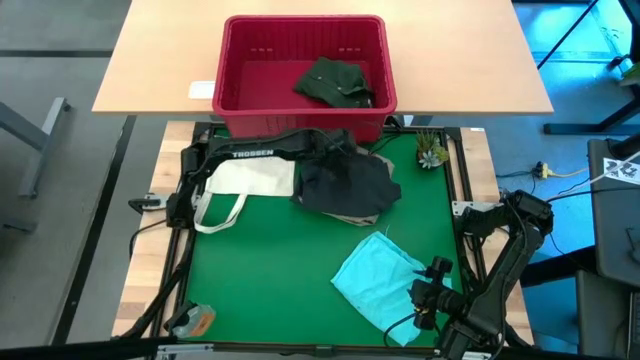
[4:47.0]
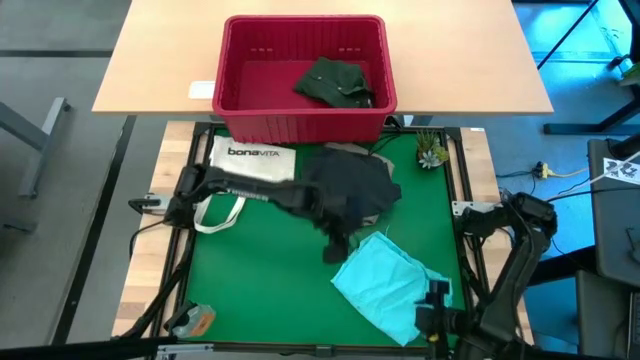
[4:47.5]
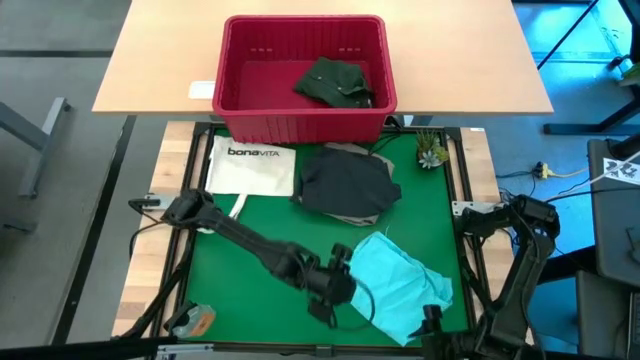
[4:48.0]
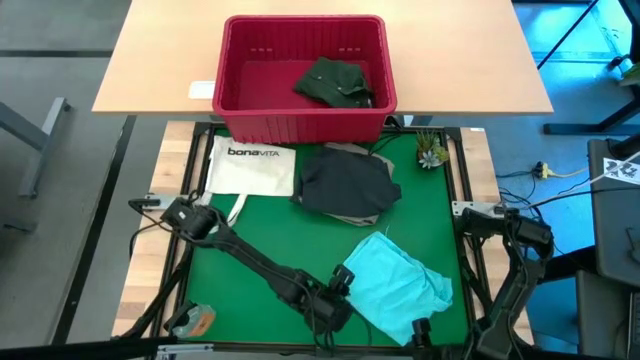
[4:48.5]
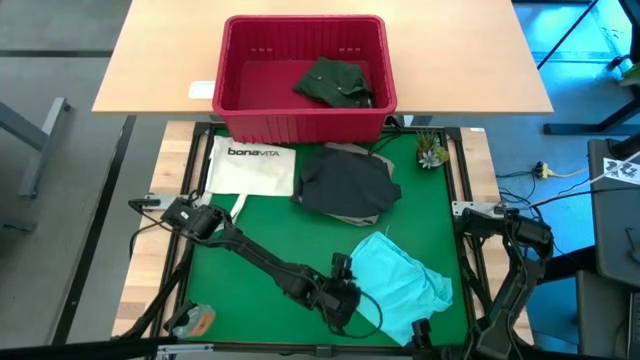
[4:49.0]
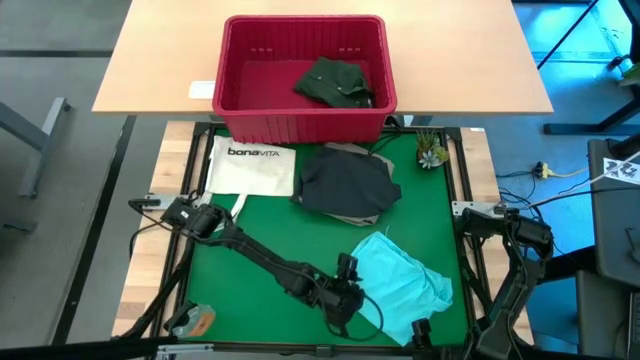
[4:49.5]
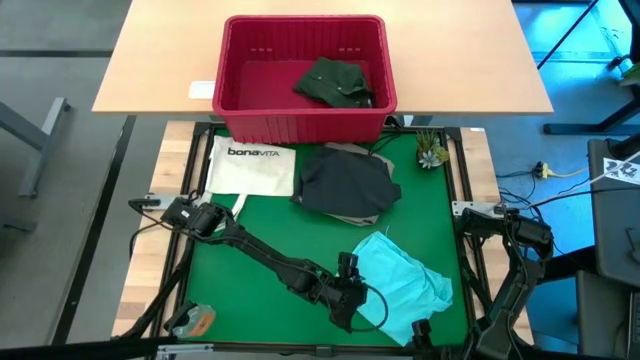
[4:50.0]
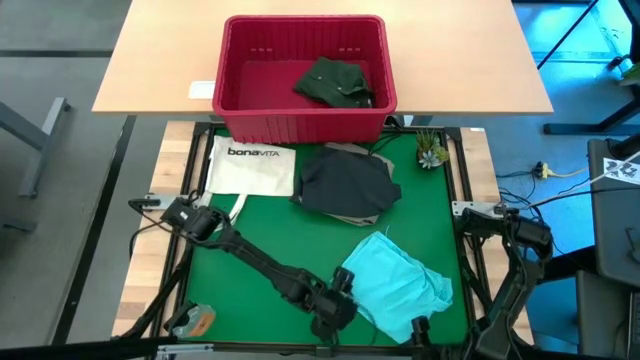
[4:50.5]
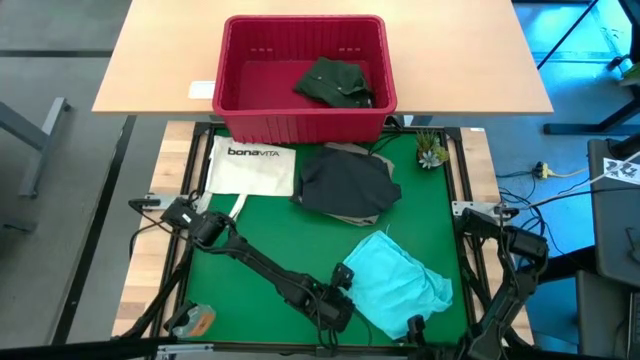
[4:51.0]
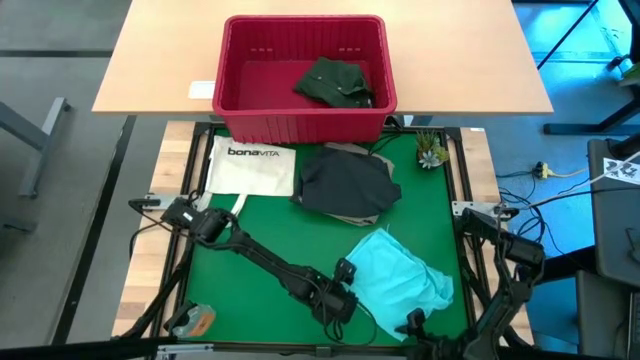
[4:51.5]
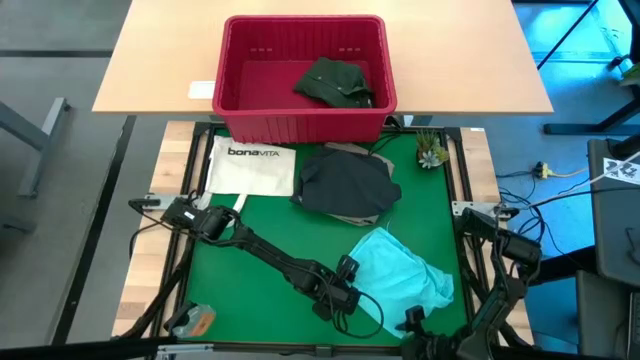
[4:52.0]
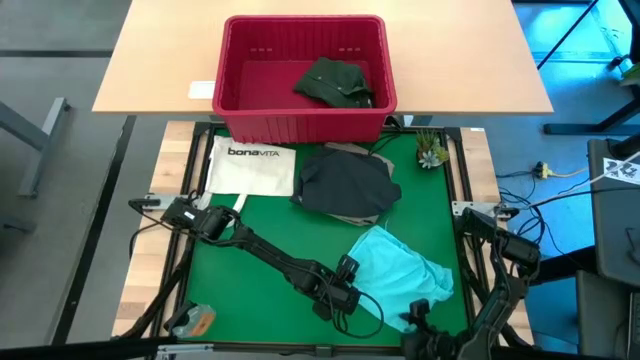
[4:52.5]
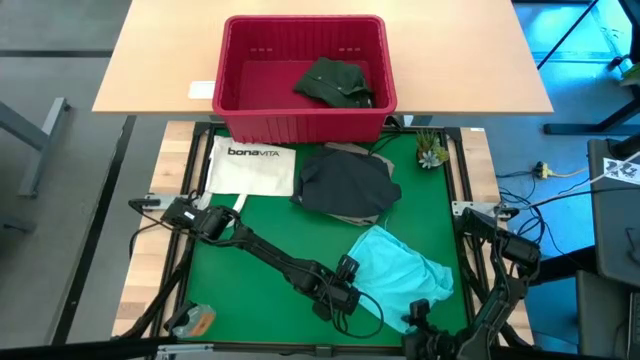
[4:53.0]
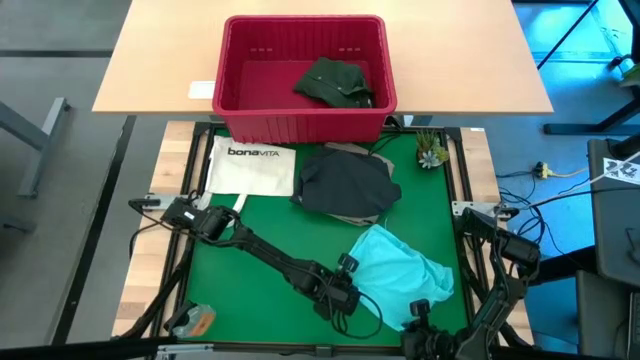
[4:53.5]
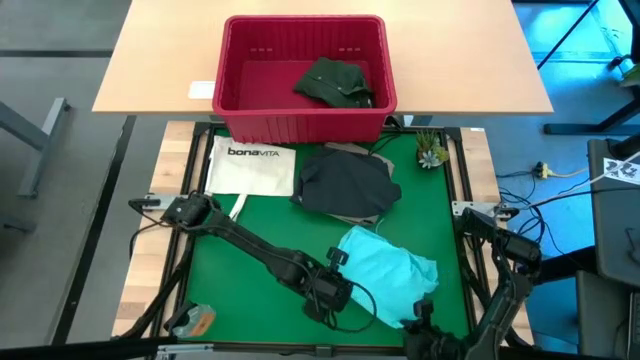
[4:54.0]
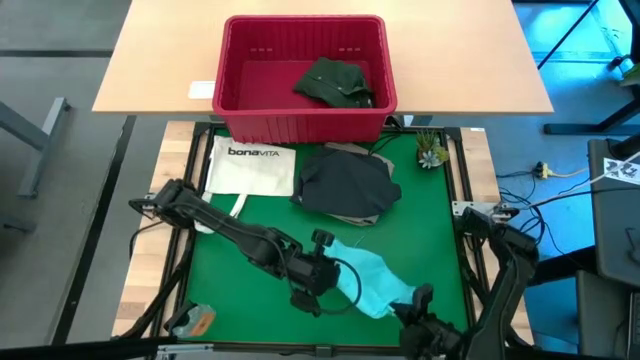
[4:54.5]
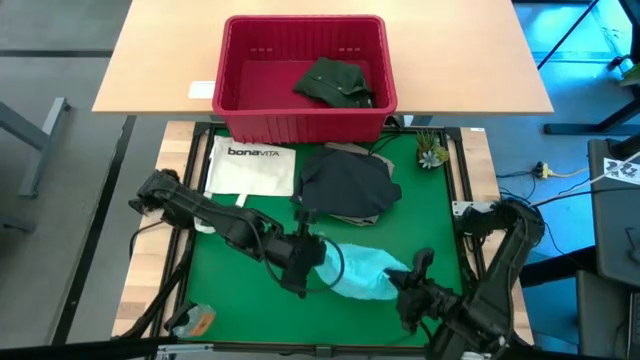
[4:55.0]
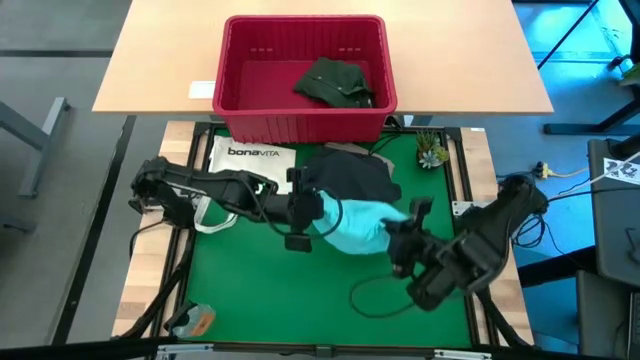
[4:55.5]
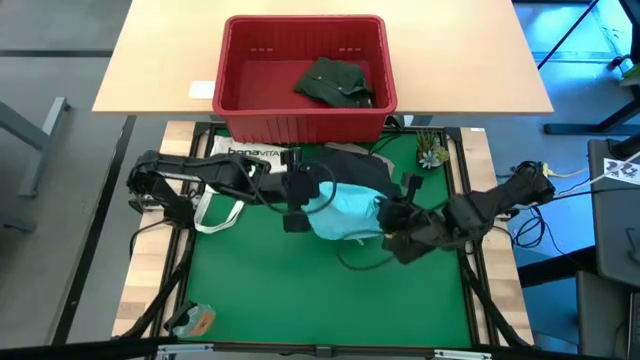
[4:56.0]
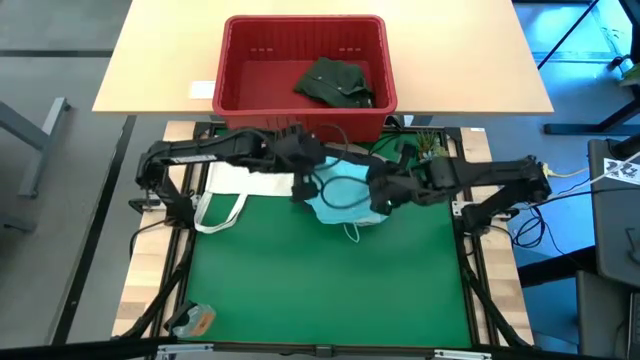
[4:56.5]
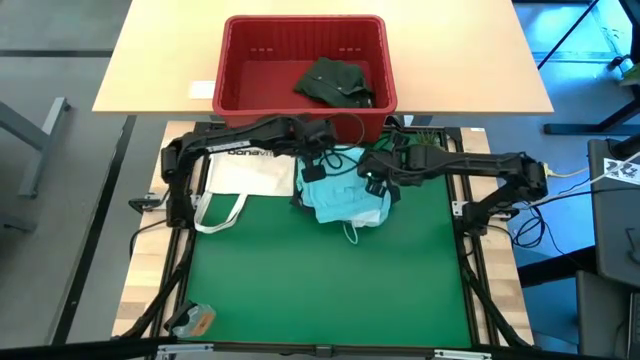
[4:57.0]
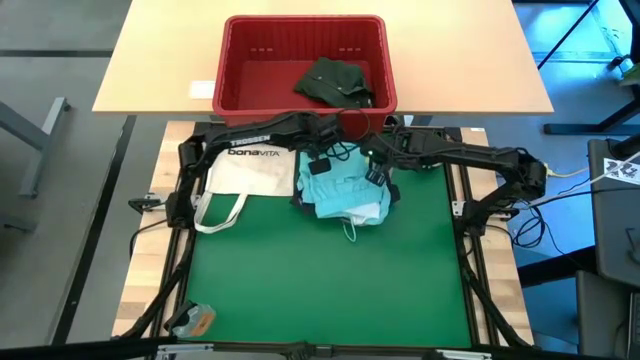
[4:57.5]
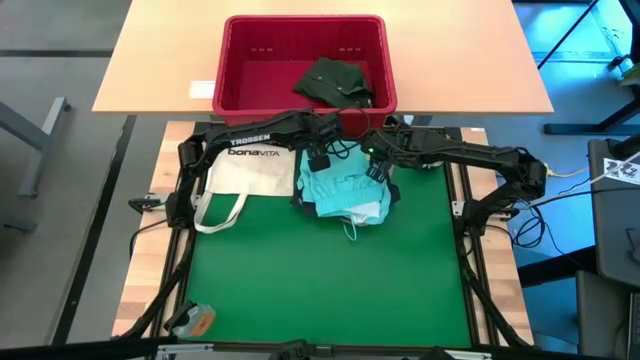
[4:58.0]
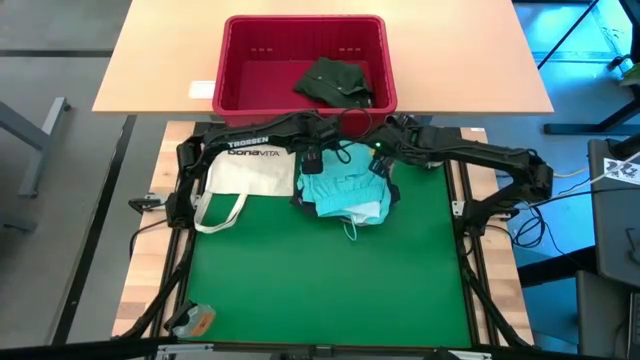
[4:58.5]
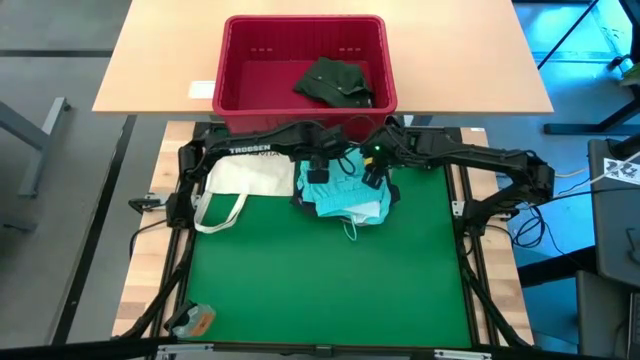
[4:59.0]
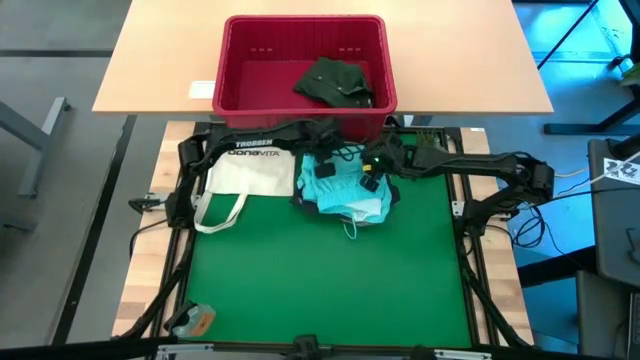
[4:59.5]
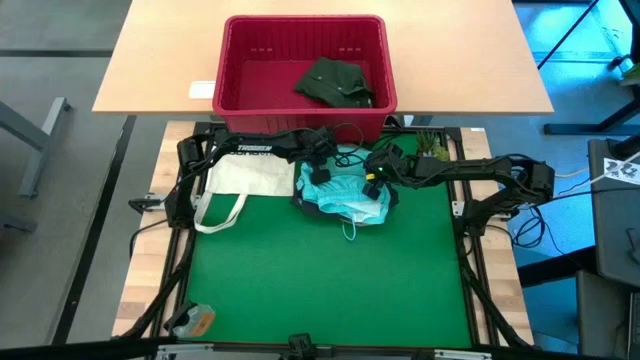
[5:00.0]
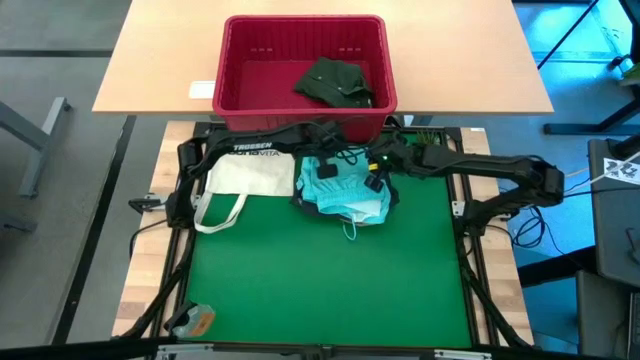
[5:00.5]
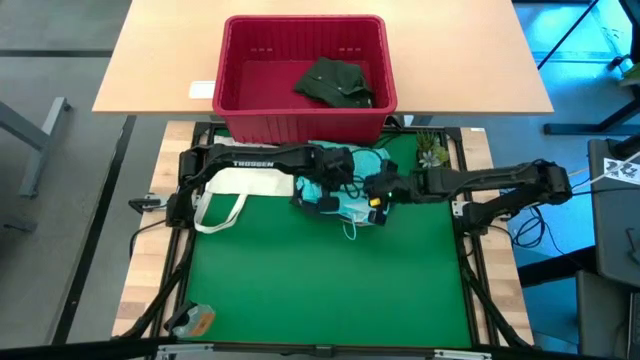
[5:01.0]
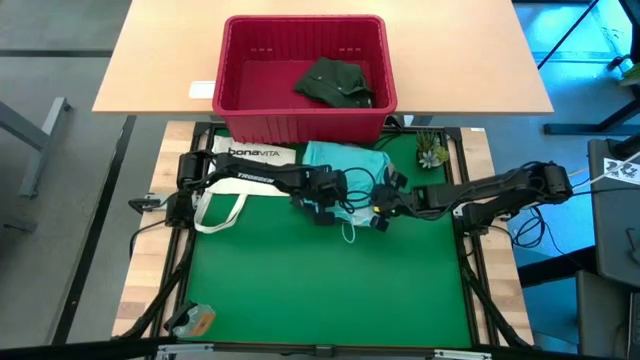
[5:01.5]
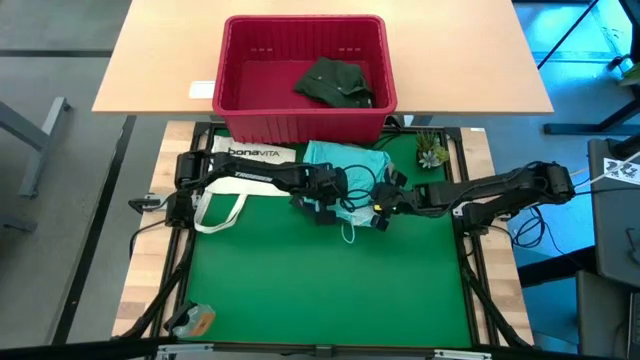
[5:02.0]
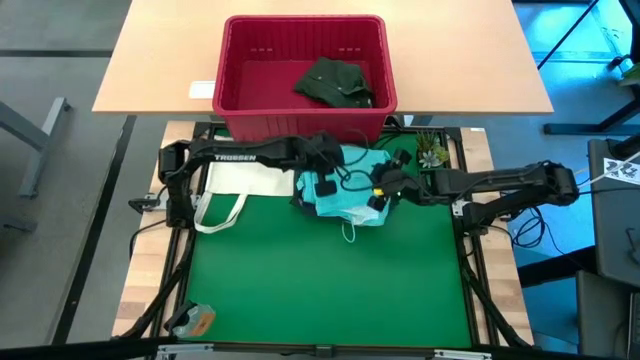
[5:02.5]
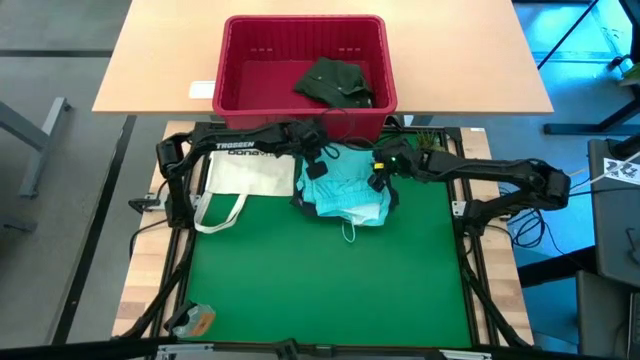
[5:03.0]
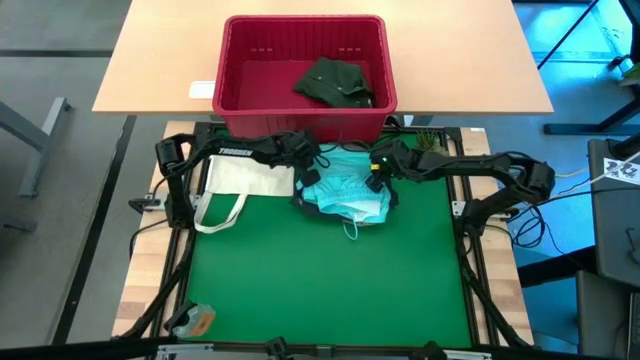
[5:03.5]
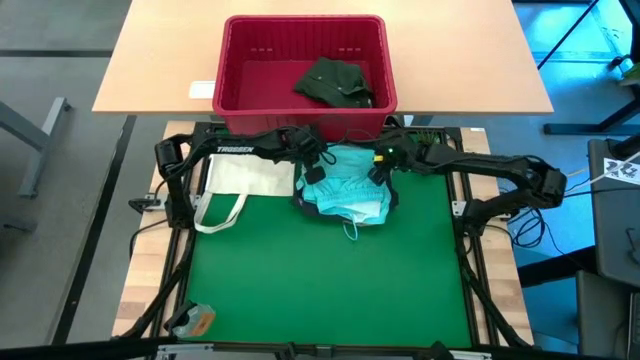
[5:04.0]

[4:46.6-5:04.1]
Task: Fold Laundry from Bin
Stack the folded light blue shorts on top of the folded black shorts

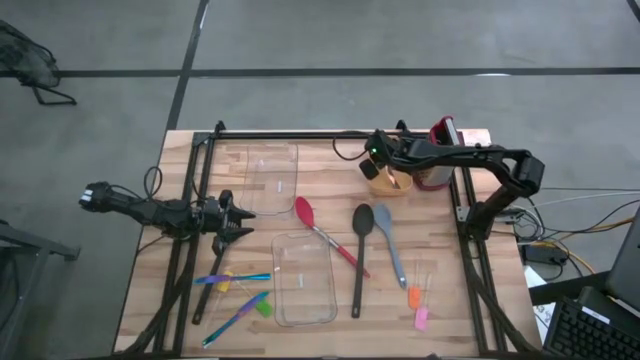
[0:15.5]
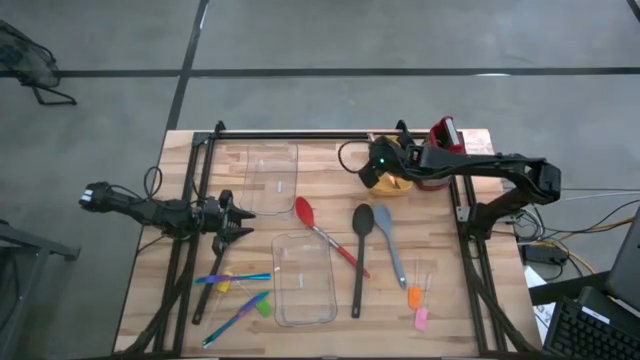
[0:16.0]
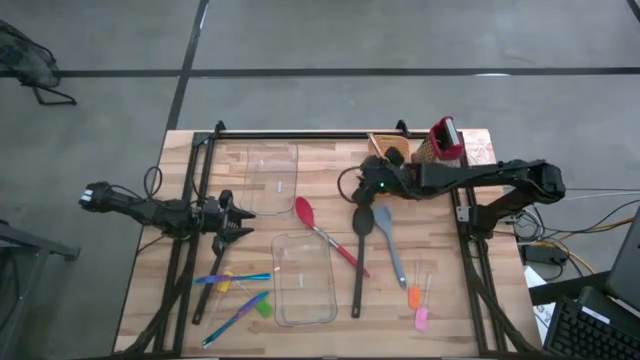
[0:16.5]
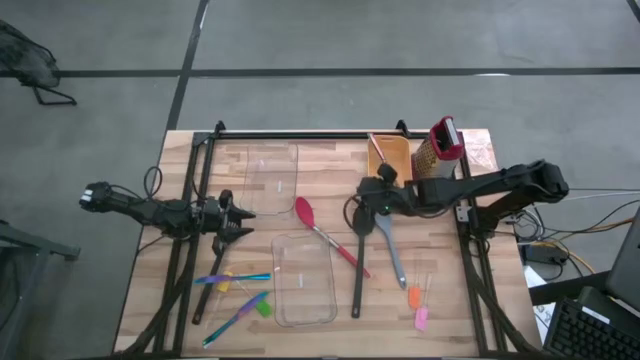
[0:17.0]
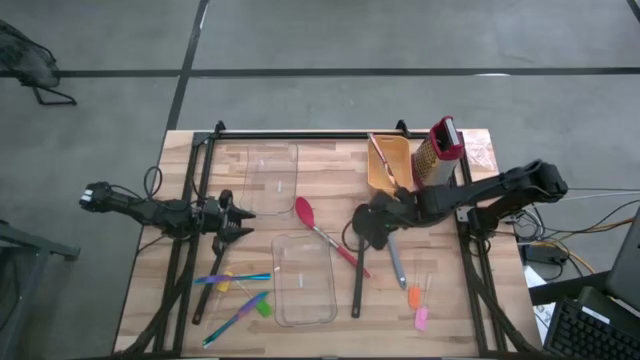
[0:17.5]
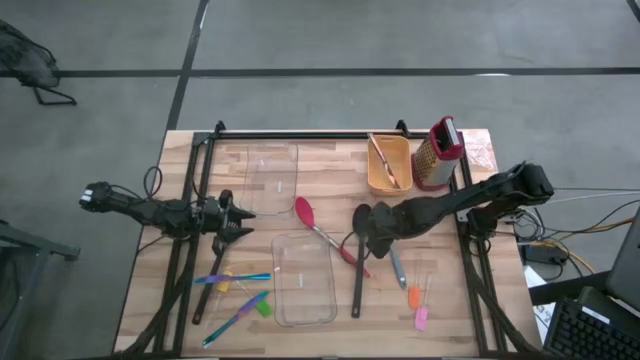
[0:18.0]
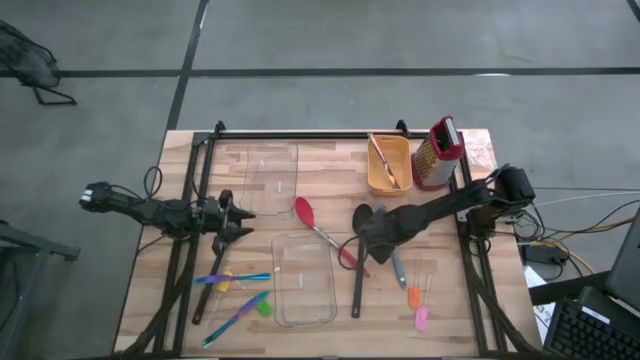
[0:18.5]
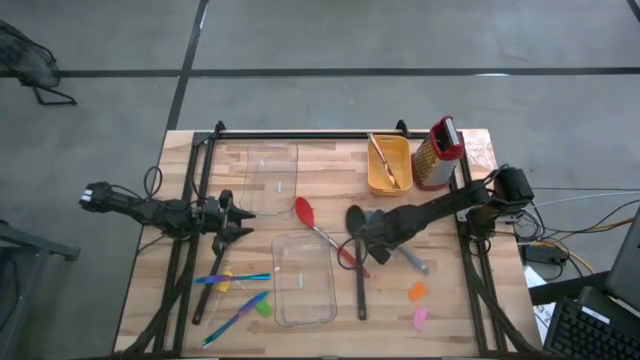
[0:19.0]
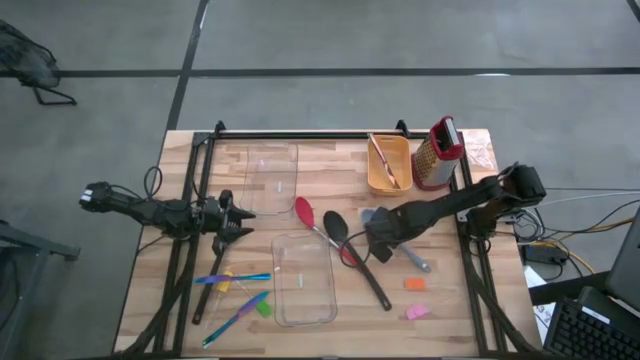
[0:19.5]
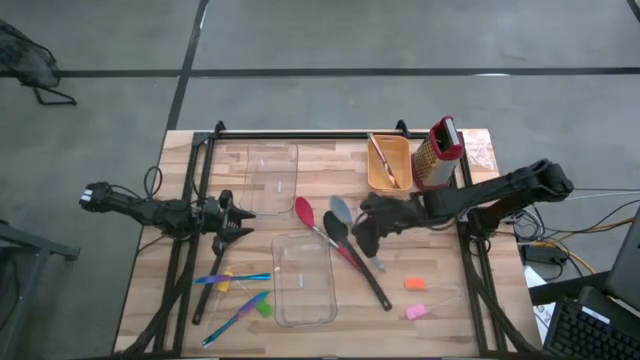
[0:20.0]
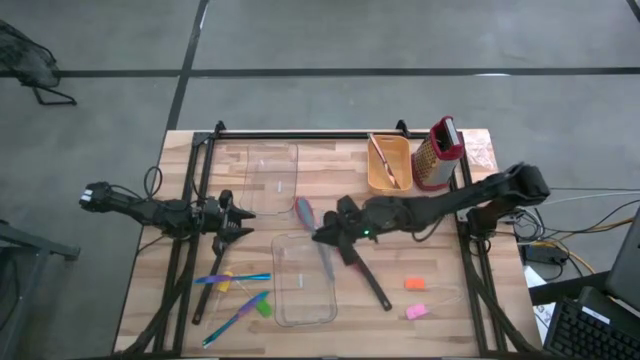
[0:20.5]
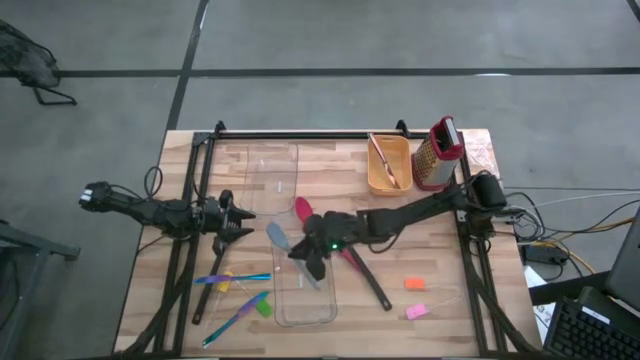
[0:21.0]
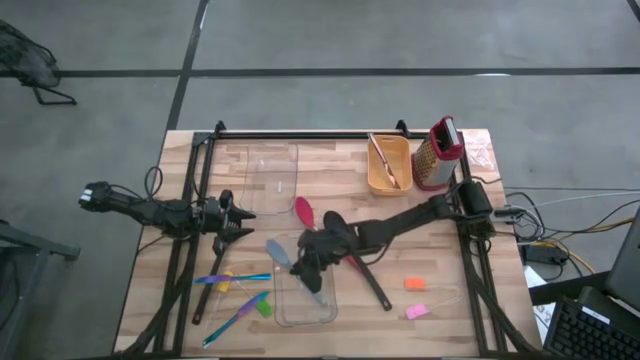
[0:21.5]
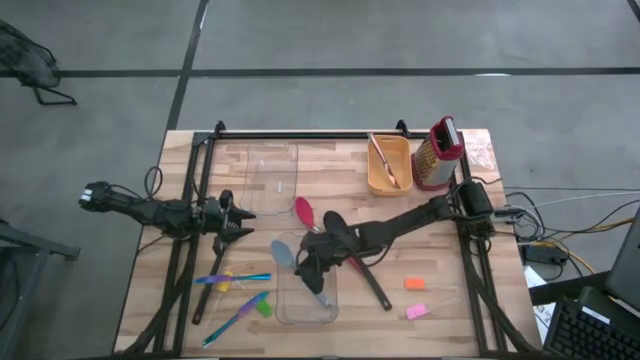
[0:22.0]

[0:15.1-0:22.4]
Task: Pick & Place Kitchen Items
Put the blue serving spoon into the bottom transparent bin
